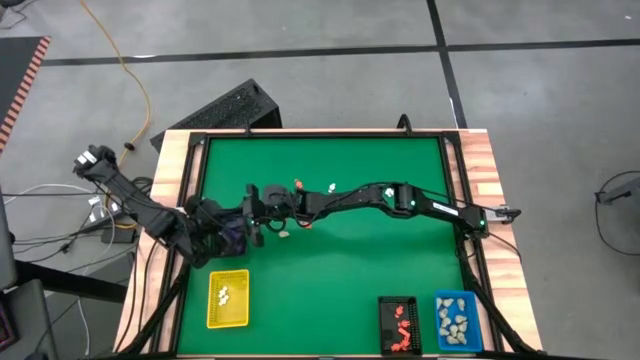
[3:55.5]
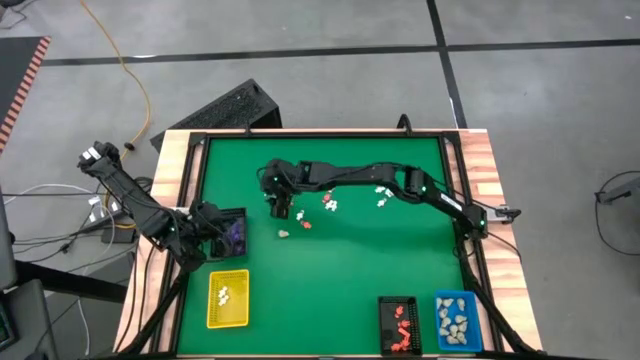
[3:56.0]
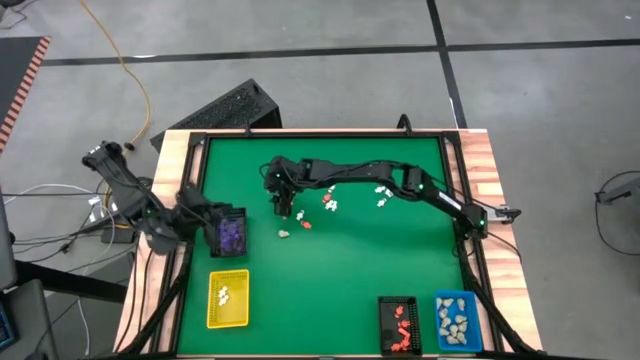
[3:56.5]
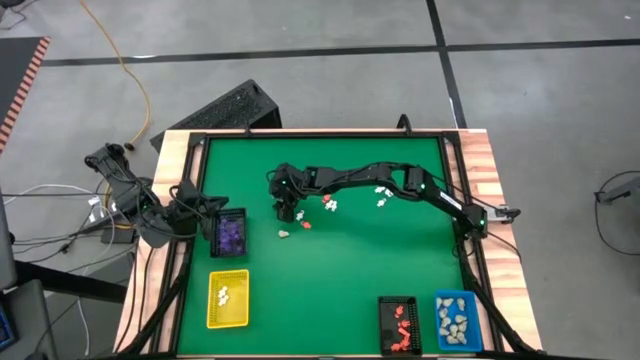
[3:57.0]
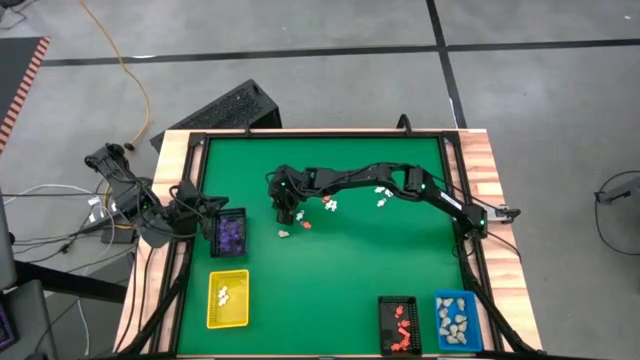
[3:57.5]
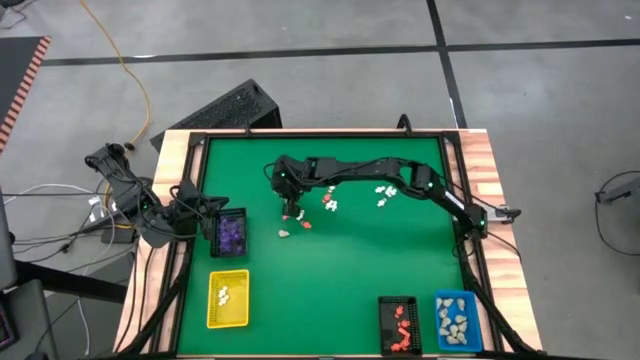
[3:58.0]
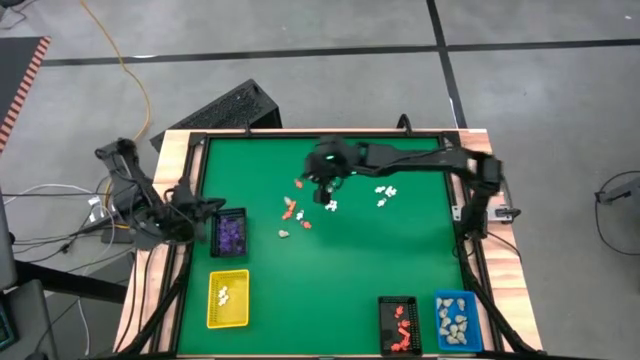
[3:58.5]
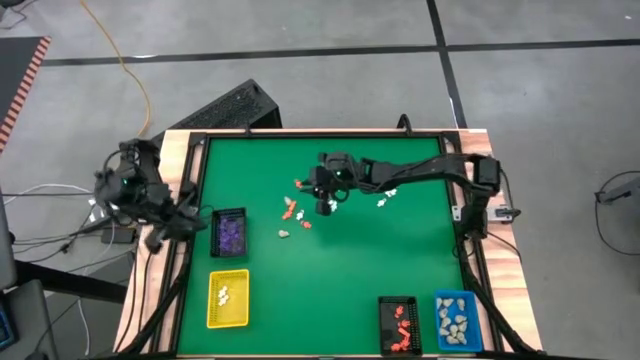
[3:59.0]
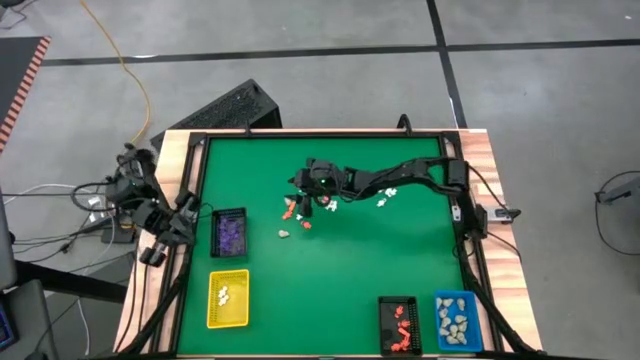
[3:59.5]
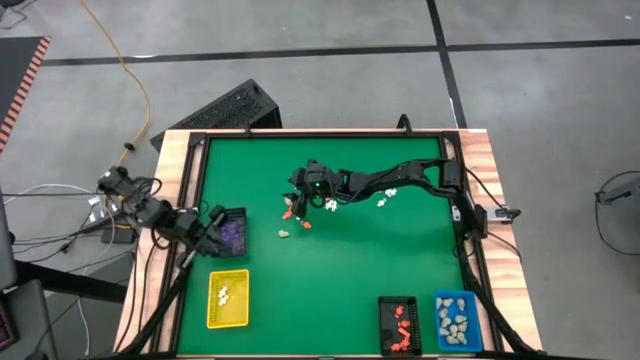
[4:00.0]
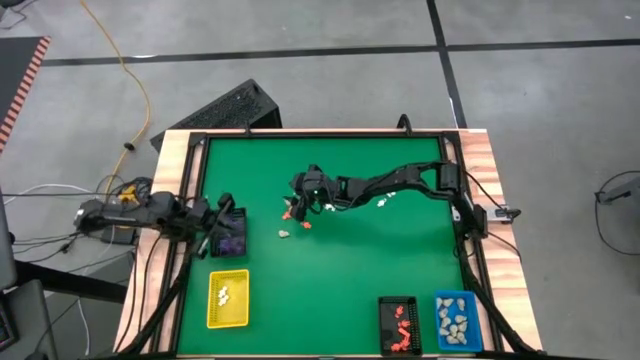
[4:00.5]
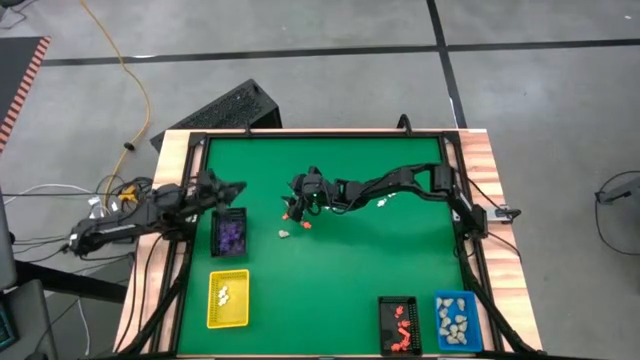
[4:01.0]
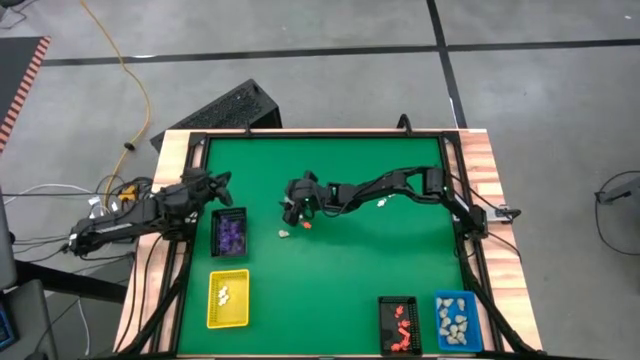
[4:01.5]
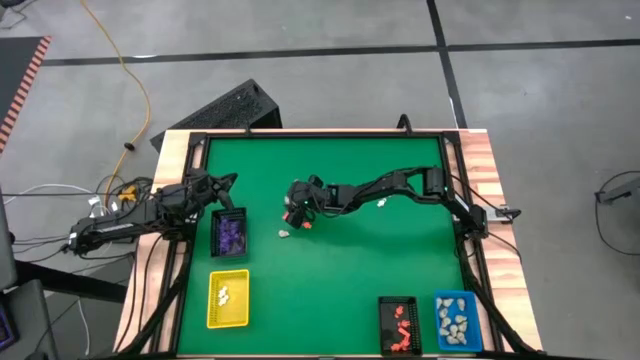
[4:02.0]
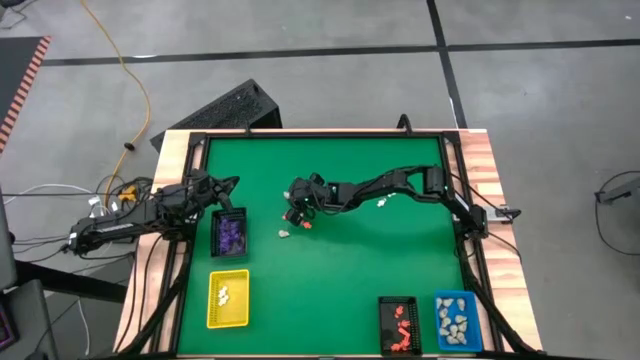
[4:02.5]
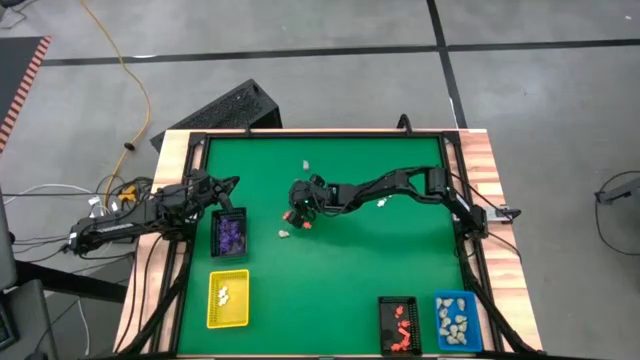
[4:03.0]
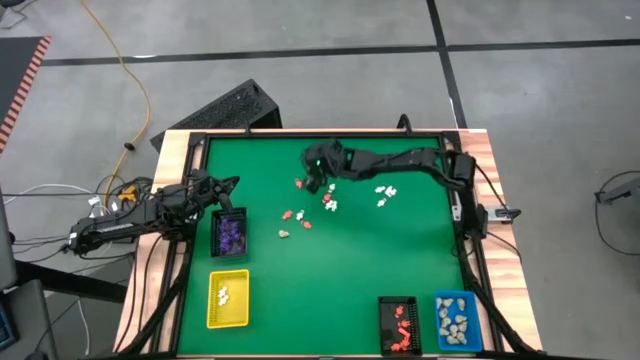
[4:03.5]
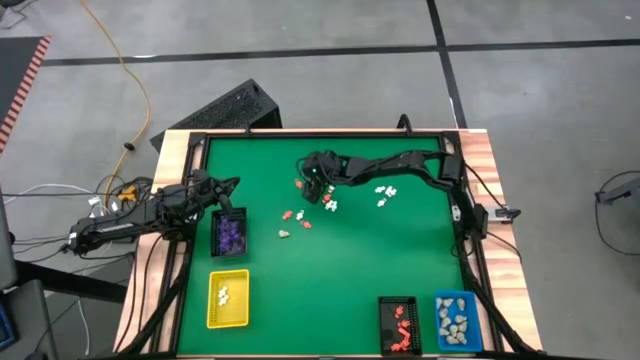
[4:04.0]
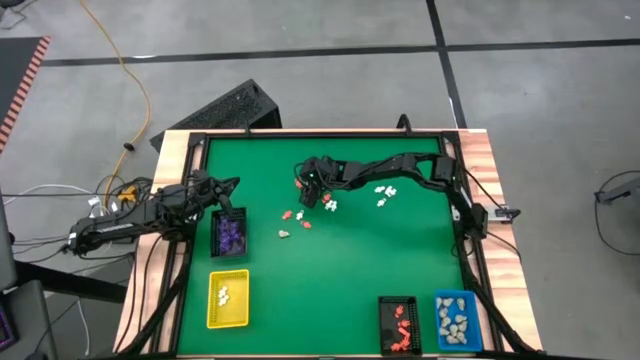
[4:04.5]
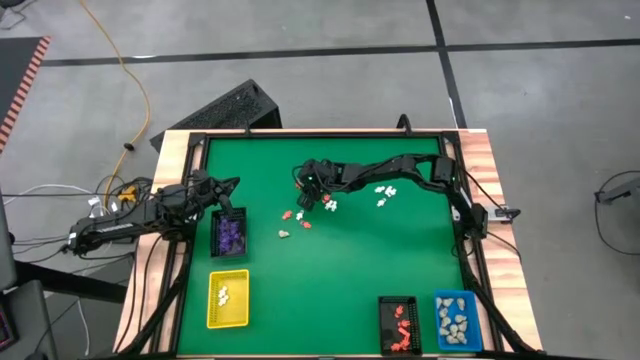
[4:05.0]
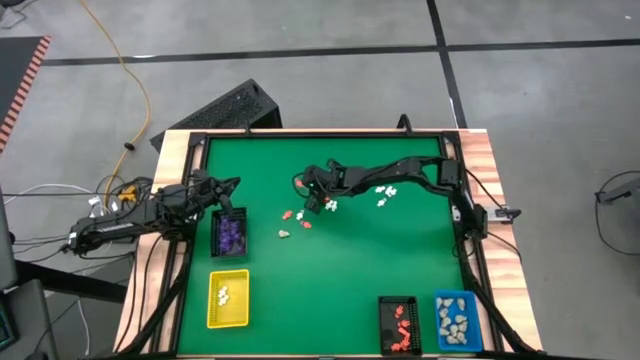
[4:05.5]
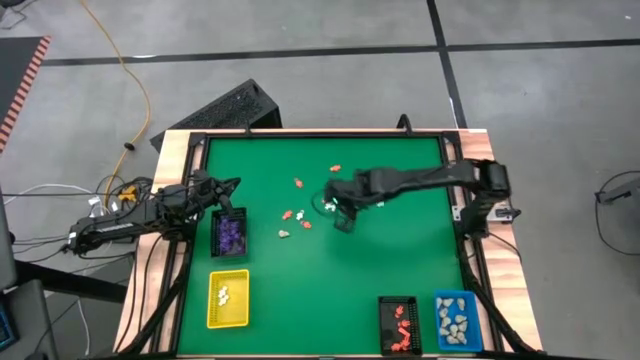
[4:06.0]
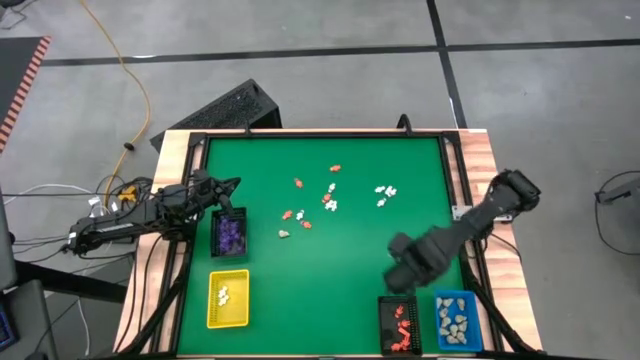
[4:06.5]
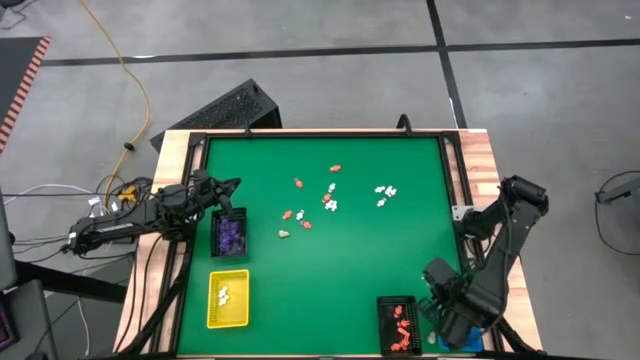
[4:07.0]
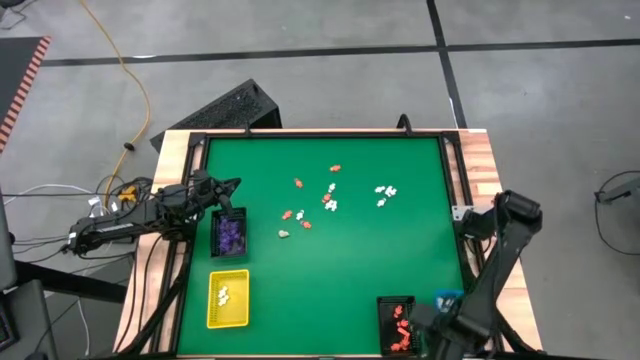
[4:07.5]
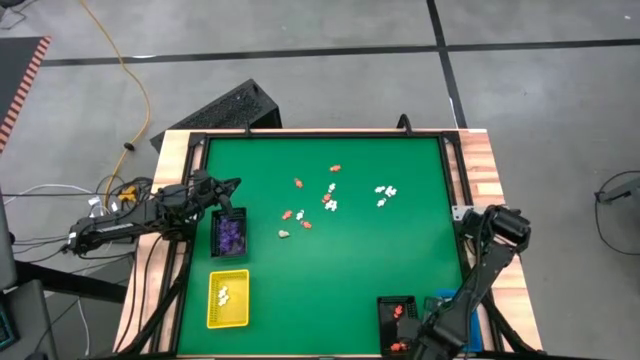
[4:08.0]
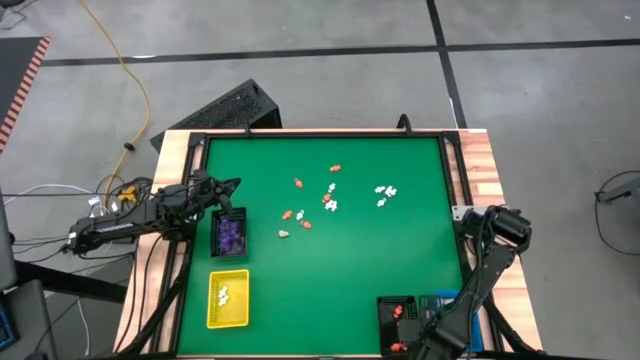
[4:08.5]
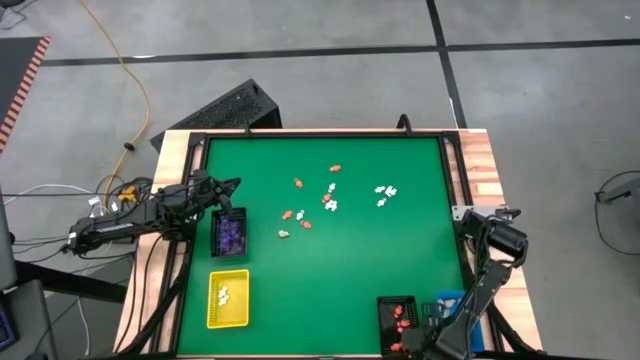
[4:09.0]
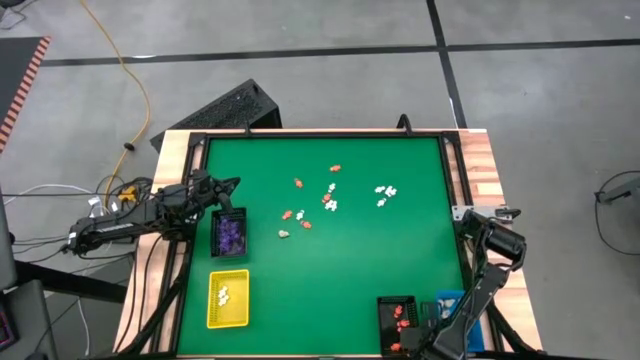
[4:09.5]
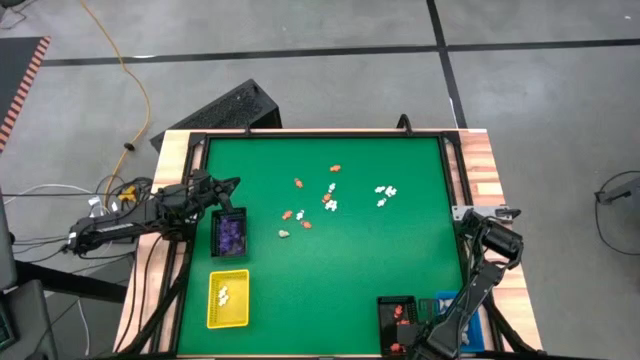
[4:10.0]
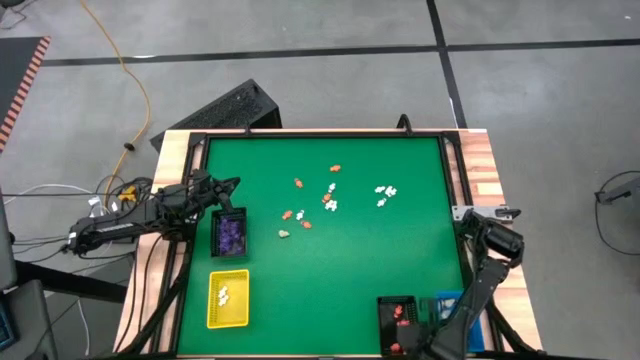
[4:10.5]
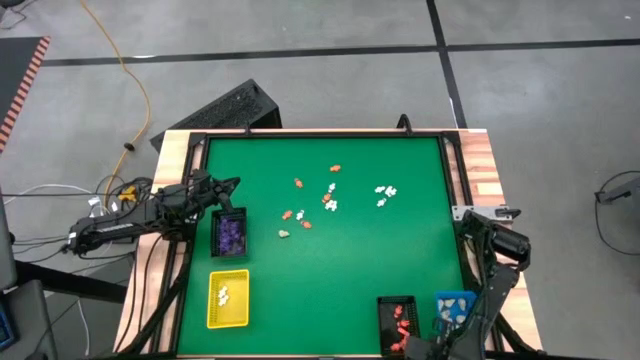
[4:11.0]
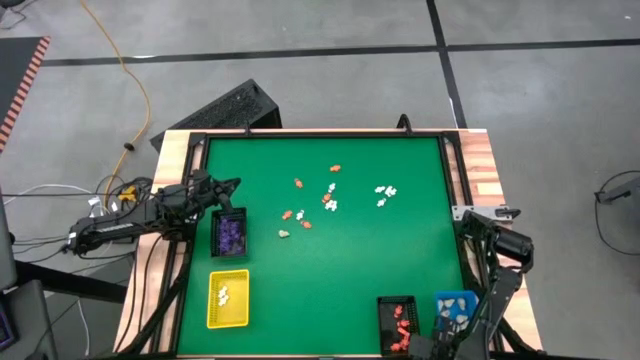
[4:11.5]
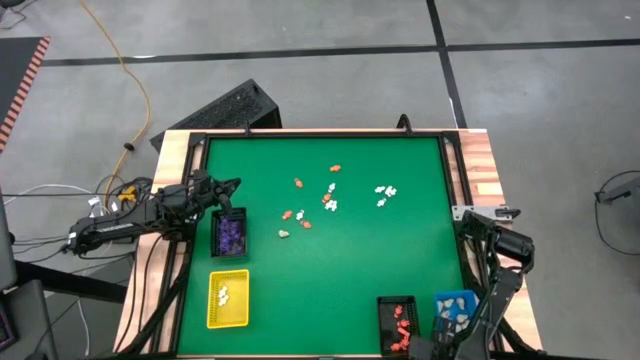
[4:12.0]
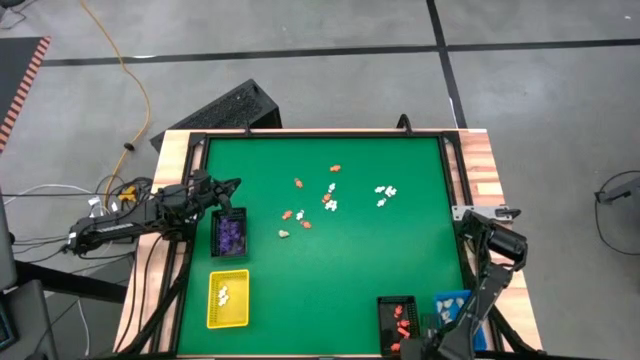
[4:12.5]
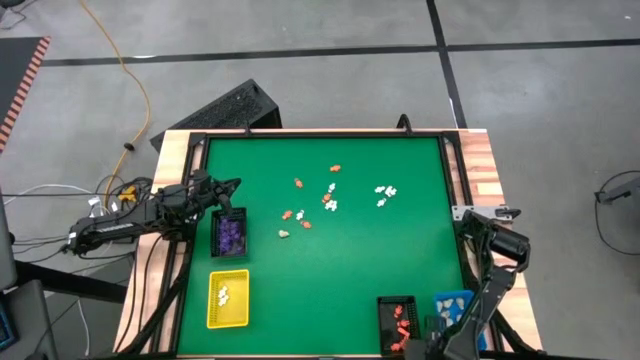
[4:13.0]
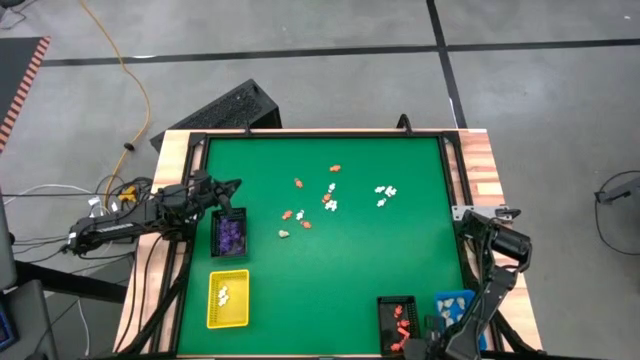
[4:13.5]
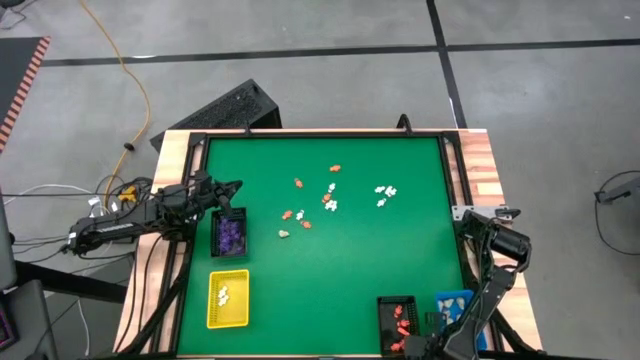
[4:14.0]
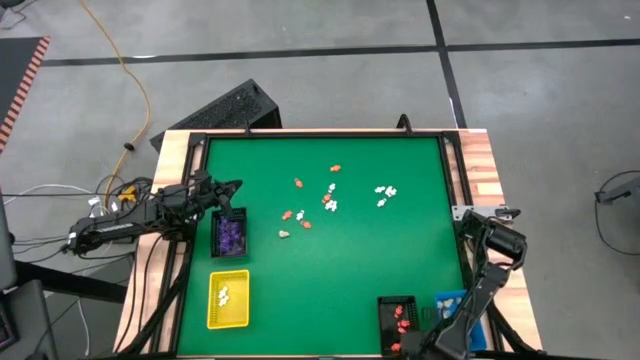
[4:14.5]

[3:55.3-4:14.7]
Task: Sort Halloween decoration
Put the white skull toy into the blue basket

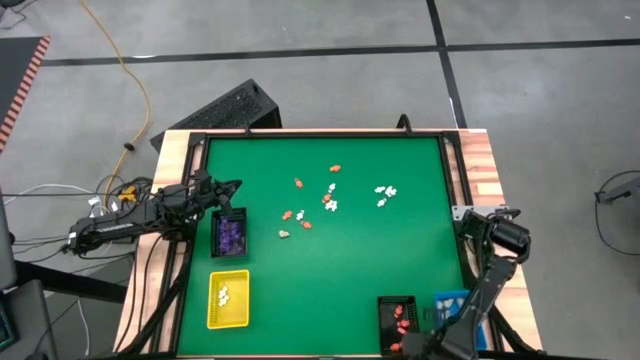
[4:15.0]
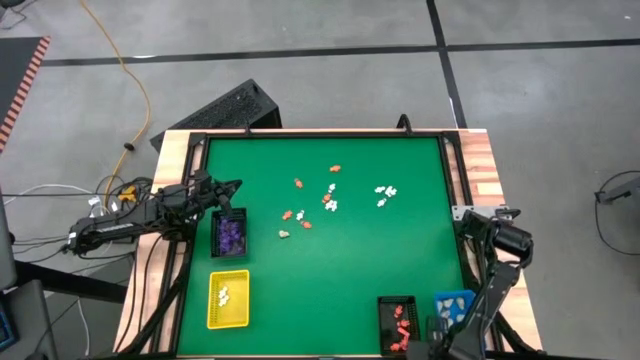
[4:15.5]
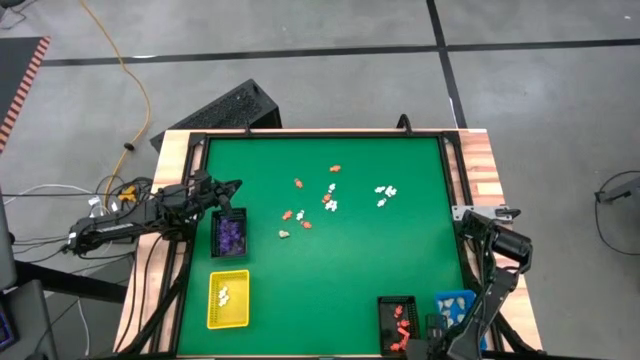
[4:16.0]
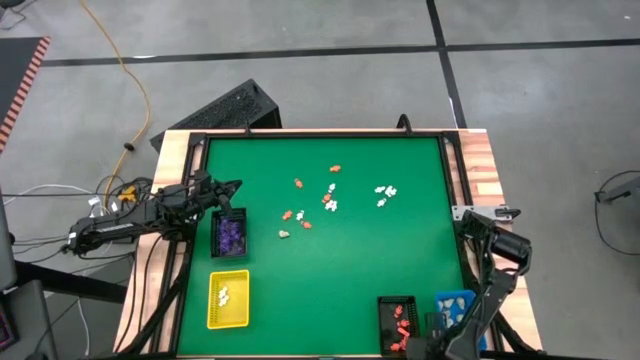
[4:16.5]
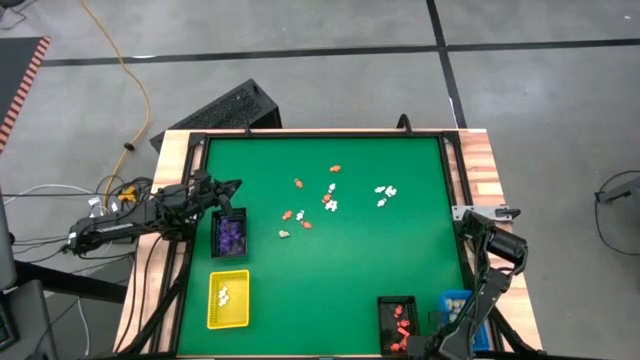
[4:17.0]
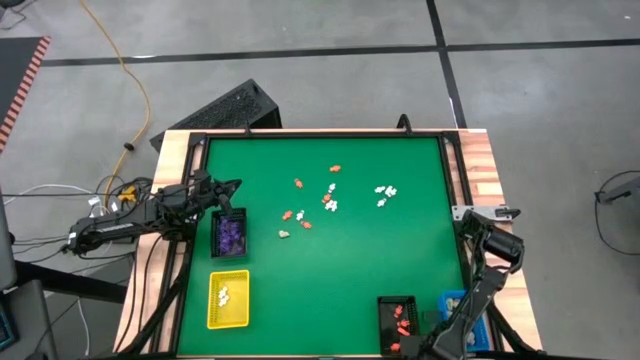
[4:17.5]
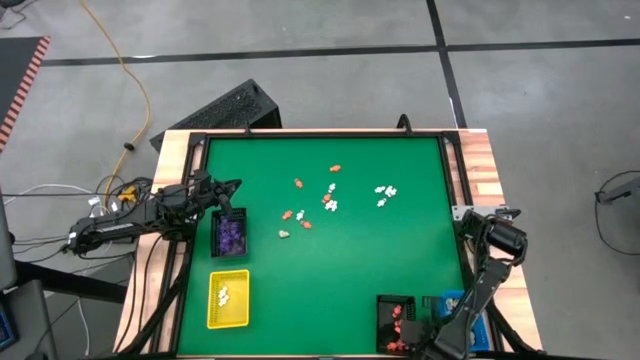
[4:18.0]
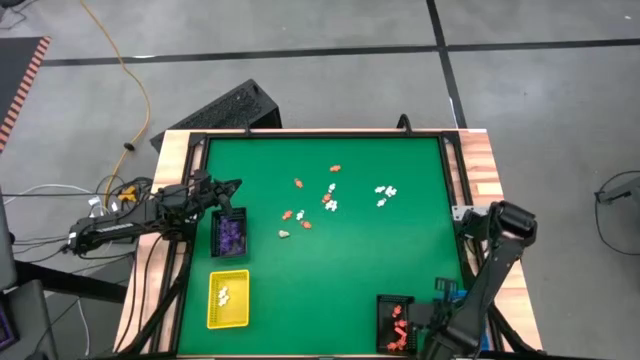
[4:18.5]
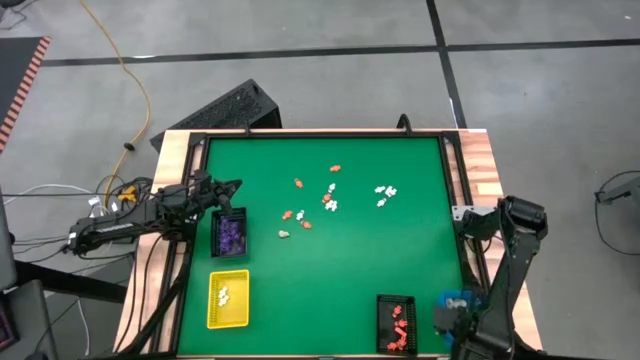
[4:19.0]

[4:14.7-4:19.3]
Put the white skull toy into the blue basket
